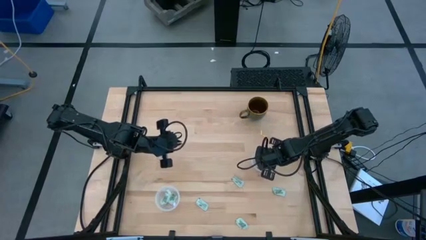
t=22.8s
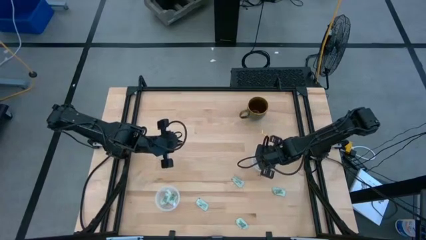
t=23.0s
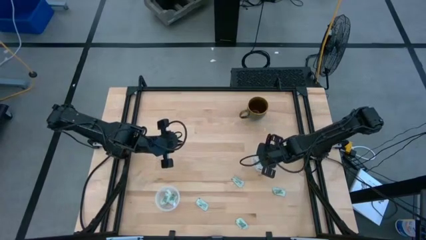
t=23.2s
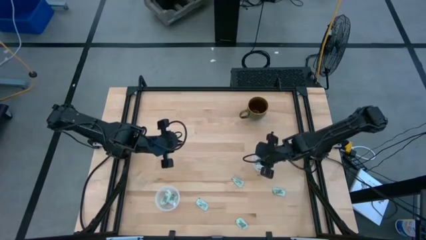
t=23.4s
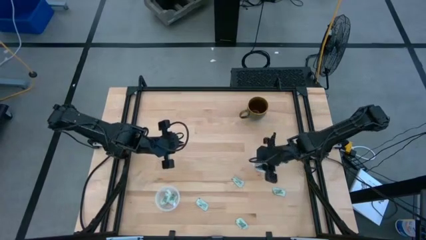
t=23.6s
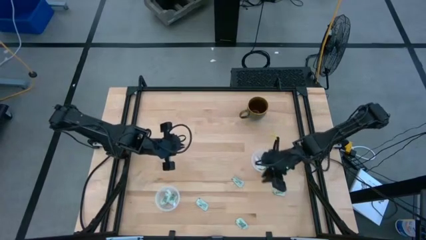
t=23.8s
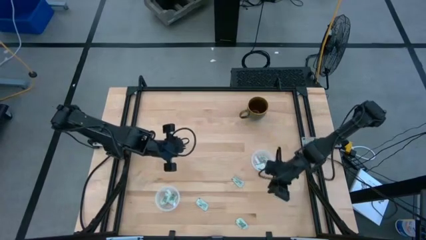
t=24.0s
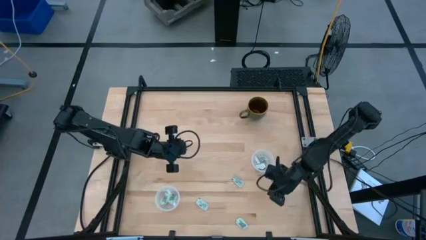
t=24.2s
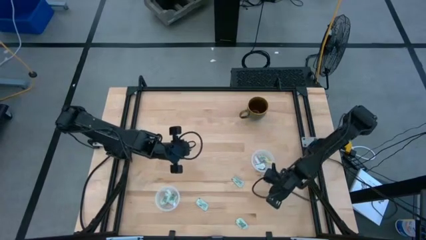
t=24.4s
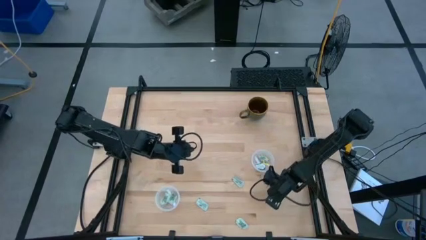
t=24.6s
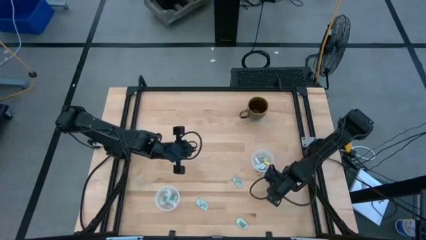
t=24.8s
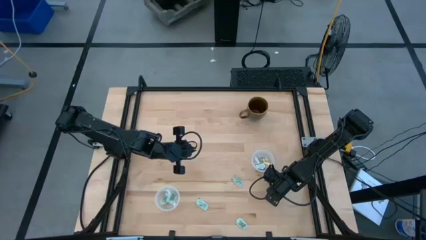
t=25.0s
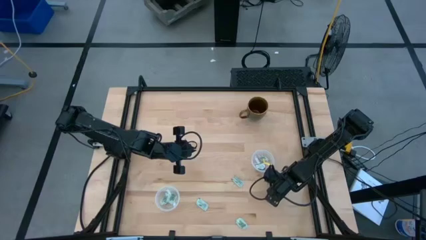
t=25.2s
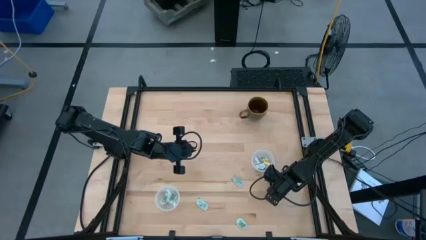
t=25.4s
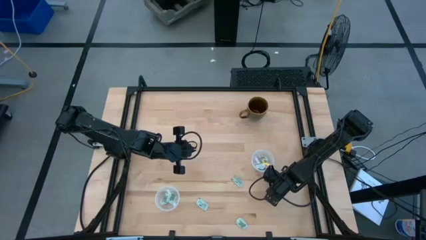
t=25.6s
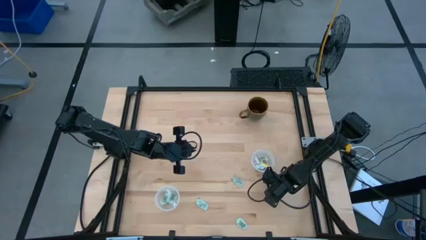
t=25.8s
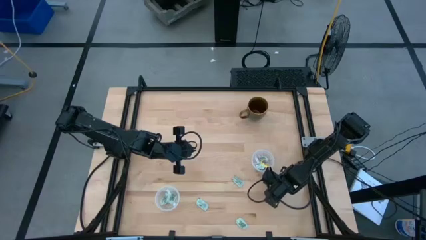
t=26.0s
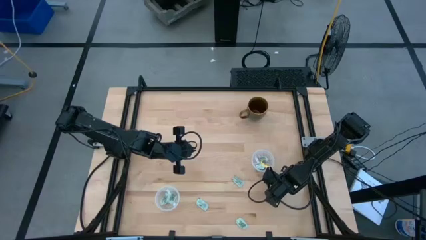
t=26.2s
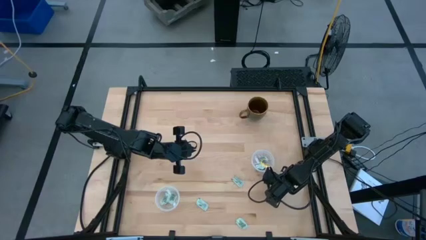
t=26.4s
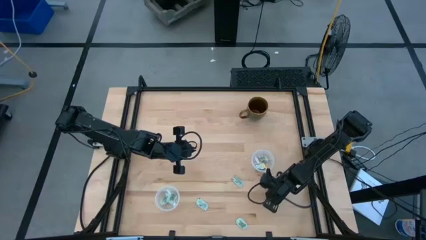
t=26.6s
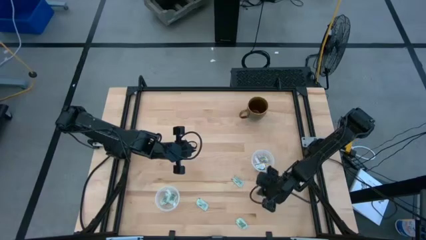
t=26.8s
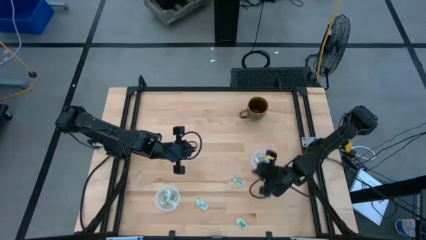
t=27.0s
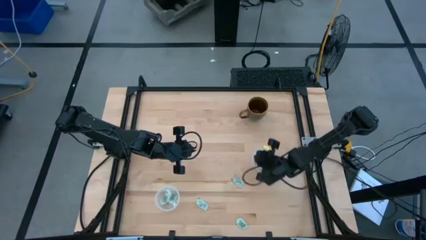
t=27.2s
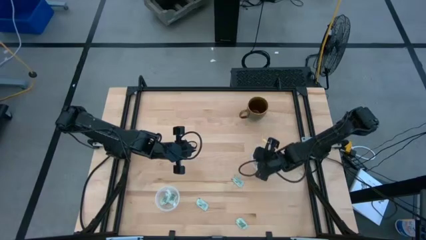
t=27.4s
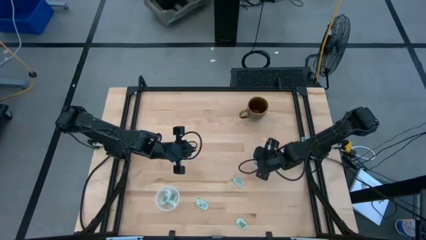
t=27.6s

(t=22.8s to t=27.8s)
Task: Pick and place Stevia / Truvia into bins
Put the stevia packet into the top transparent container

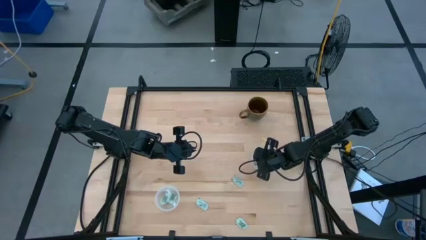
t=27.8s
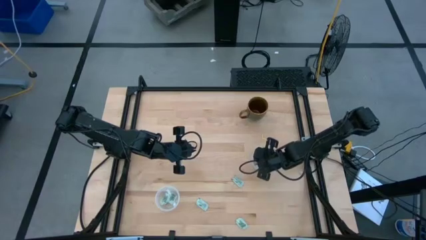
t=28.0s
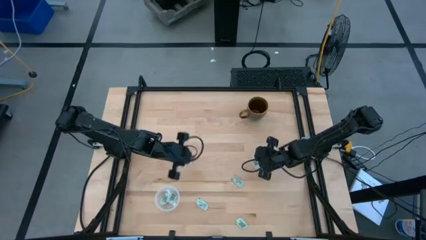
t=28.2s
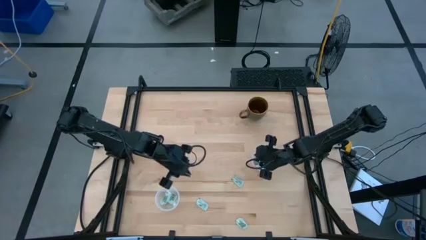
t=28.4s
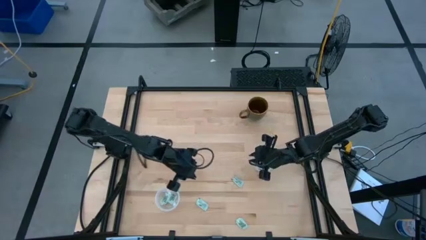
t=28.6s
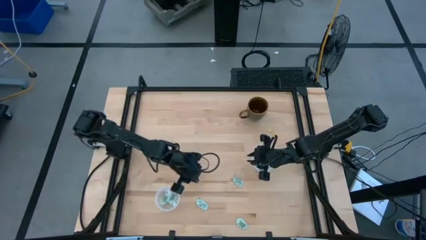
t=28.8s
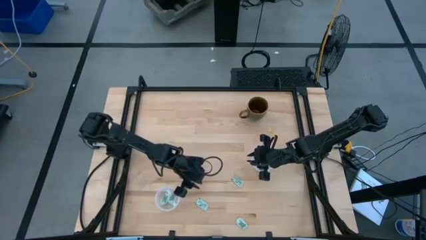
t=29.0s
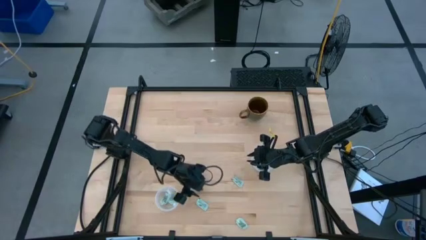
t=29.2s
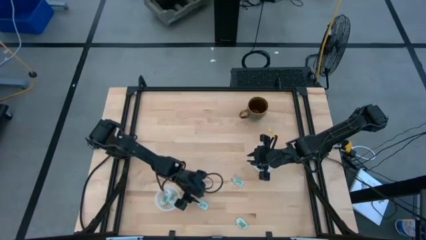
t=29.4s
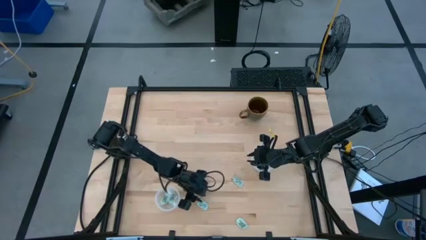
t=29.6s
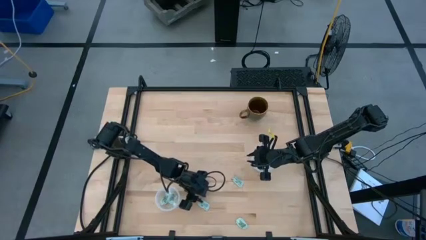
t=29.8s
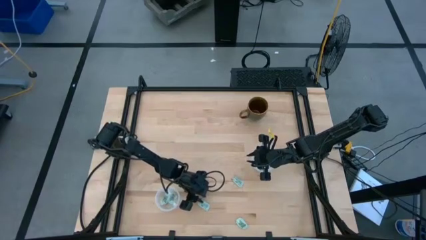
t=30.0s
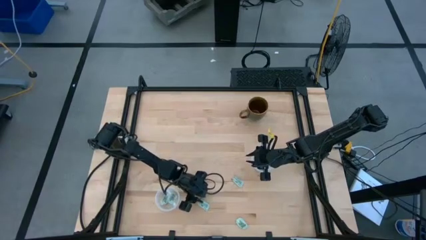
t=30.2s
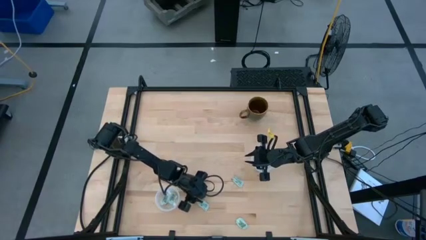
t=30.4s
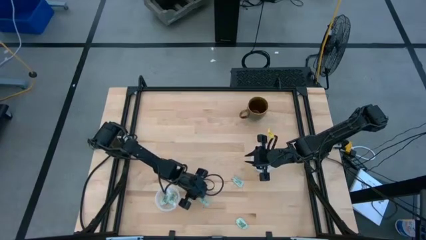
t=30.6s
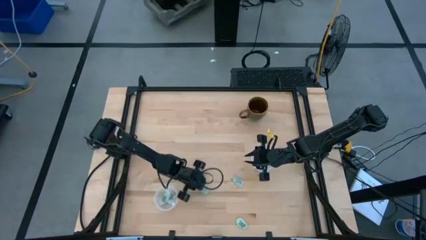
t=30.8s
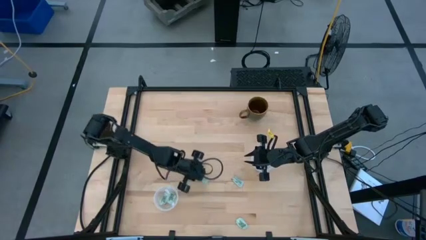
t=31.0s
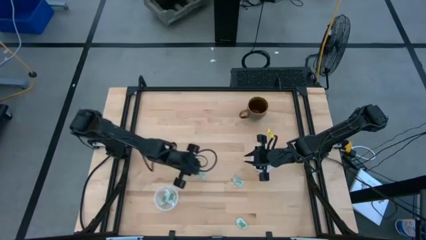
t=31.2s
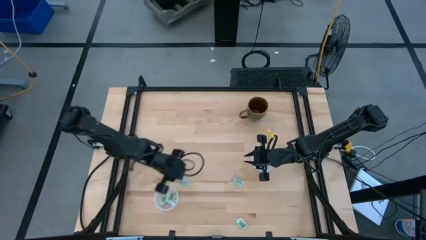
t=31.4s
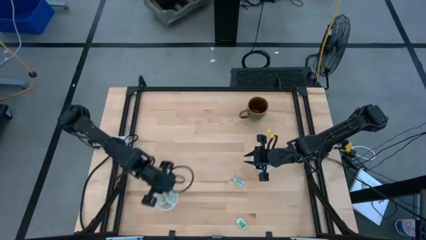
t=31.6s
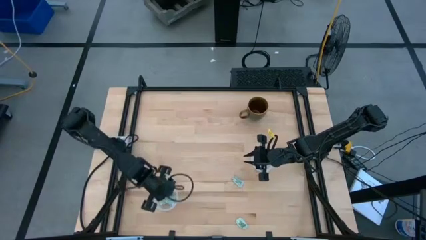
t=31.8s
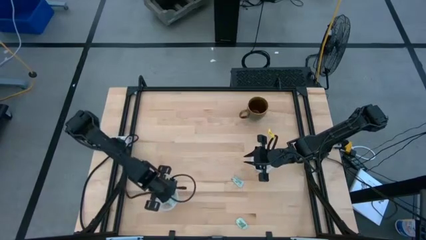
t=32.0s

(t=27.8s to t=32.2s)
Put the stevia packet into the bottom transparent container

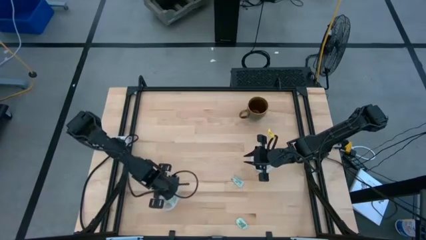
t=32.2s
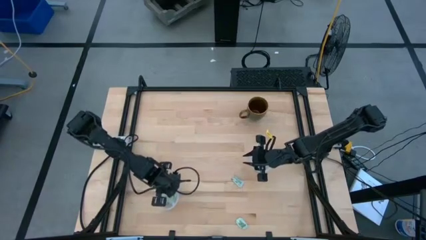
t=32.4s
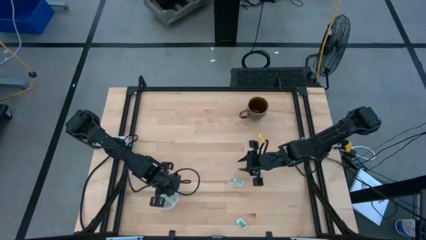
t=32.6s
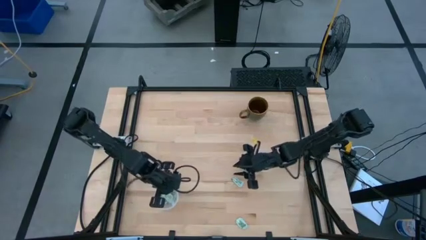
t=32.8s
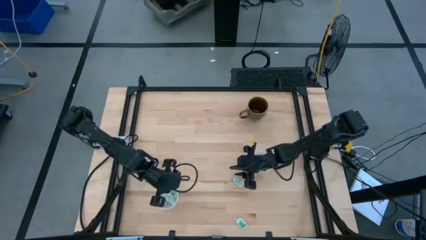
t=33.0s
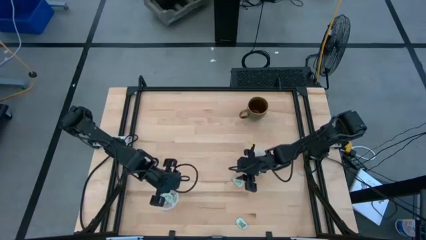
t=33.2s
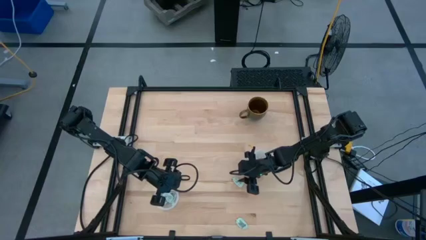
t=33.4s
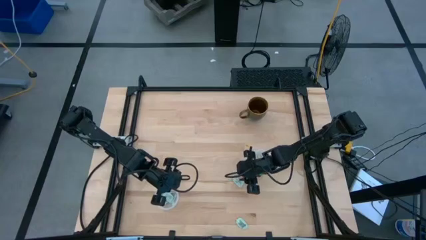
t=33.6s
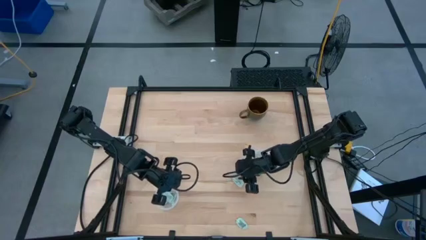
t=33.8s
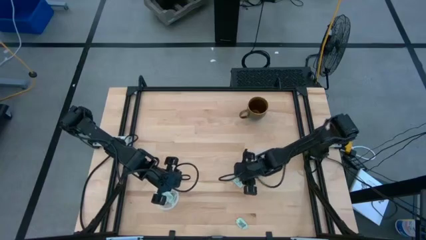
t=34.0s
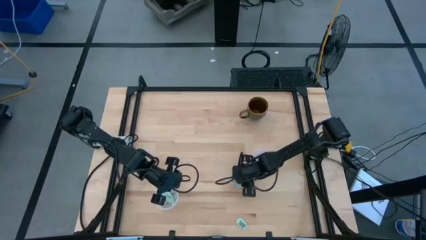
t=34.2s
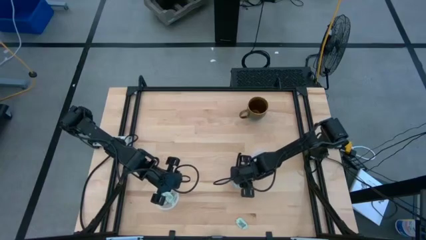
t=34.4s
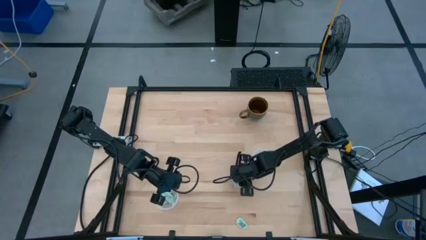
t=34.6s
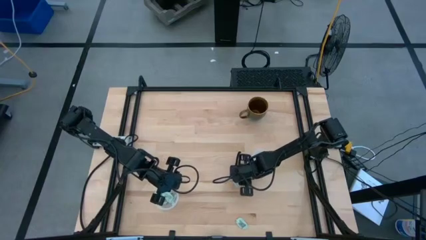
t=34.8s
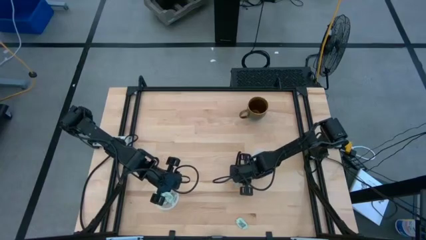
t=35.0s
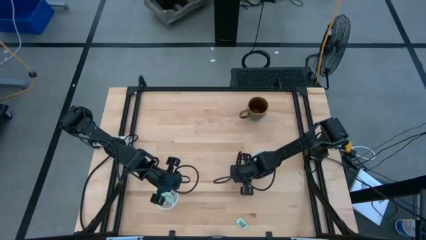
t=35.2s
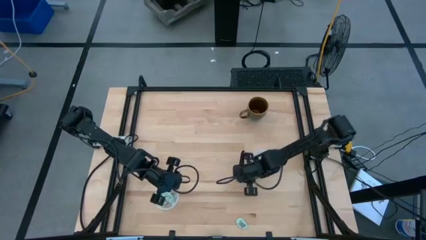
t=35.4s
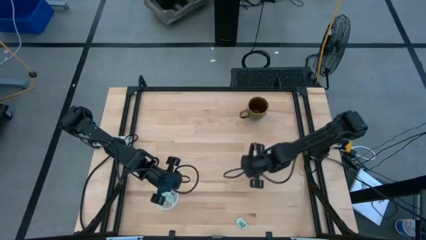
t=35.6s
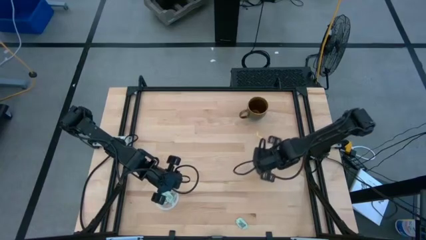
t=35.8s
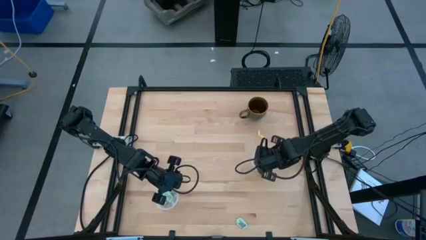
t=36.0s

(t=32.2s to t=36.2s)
Put the stevia packet into the top transparent container

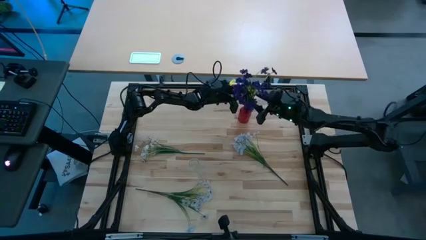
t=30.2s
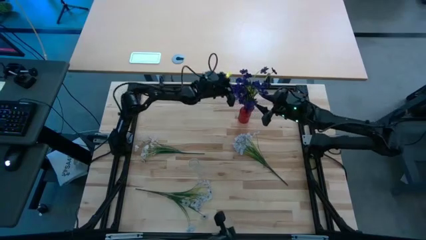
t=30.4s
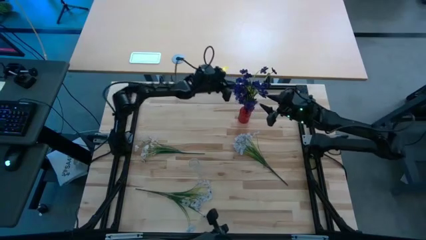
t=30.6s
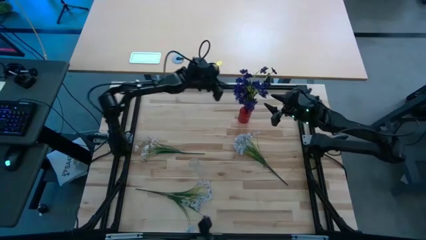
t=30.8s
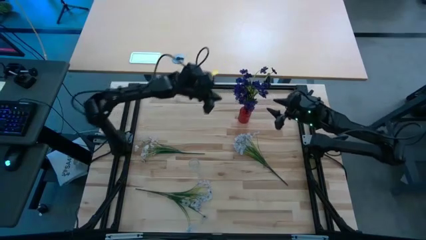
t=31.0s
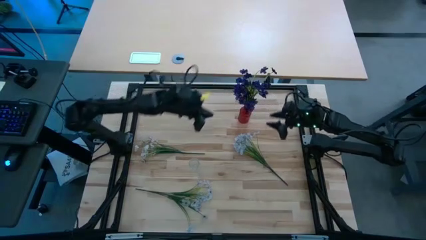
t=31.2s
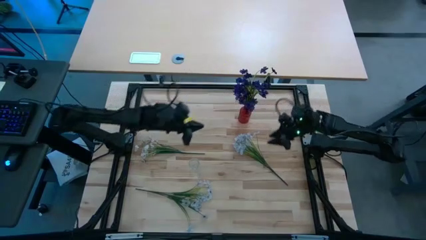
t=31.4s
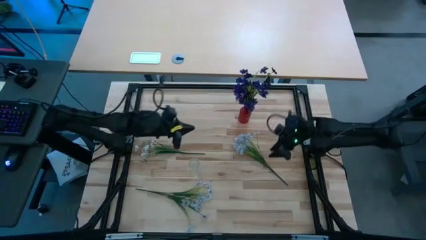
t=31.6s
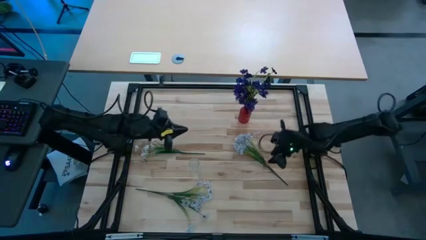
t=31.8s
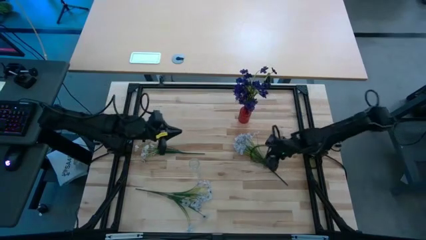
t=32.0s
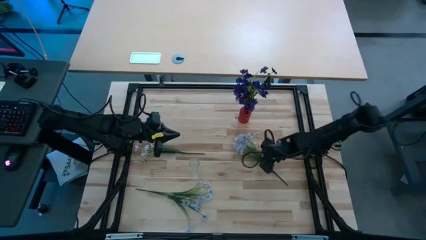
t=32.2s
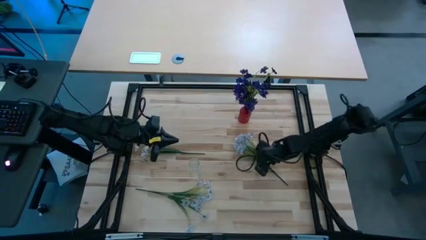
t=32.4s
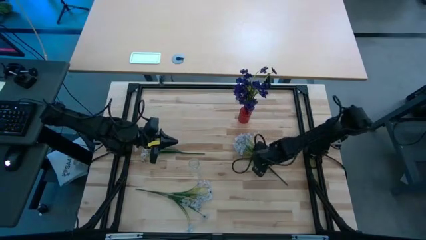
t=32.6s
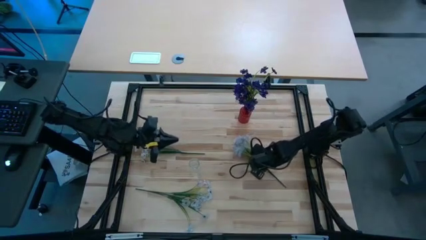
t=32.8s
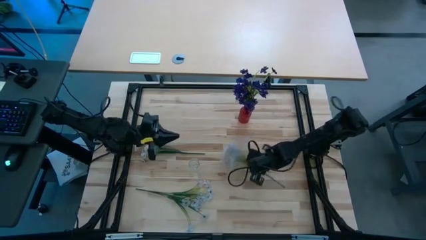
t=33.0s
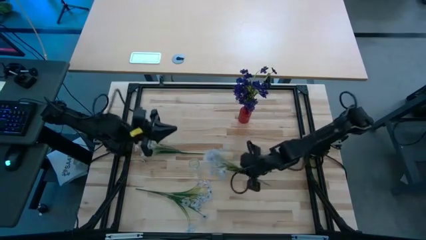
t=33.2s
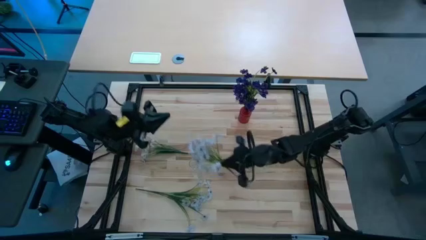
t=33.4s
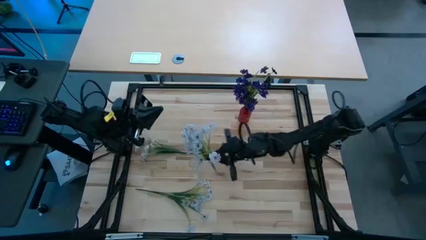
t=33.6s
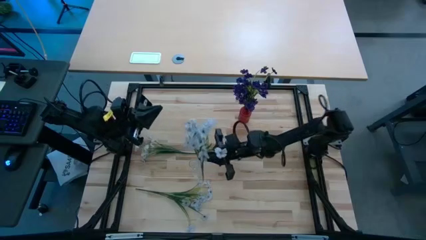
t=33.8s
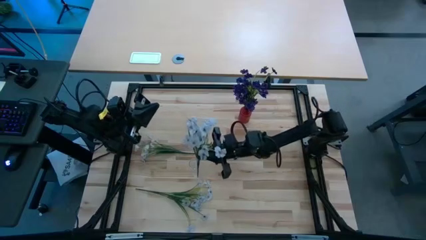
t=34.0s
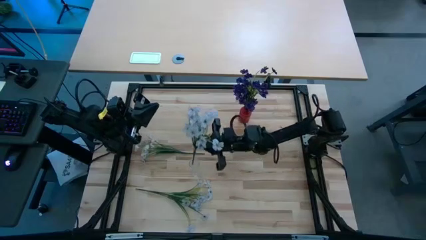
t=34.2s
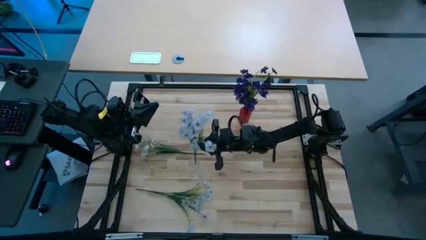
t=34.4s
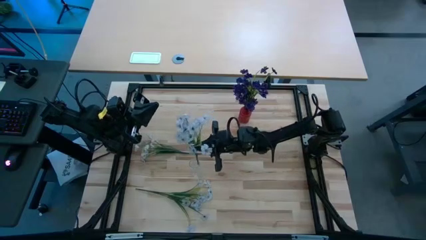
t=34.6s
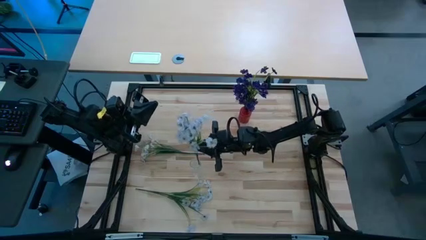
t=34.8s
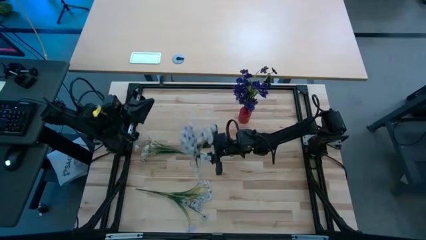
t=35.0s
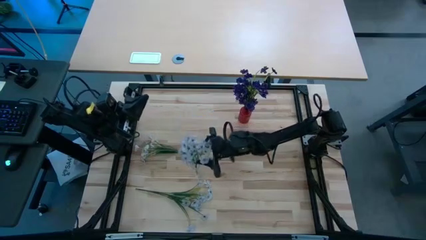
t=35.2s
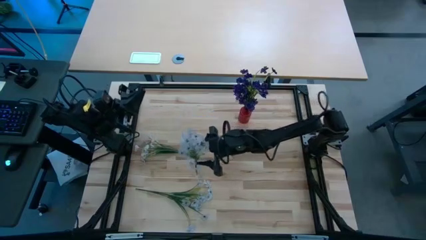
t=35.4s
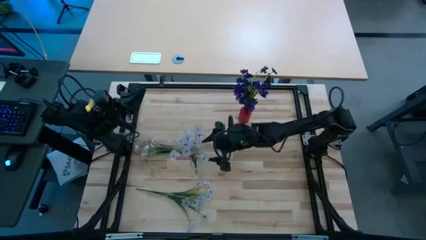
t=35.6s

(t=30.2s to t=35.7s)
Task: Sort flowers into vase by color
Put the top right white flowers into the transparent vase
